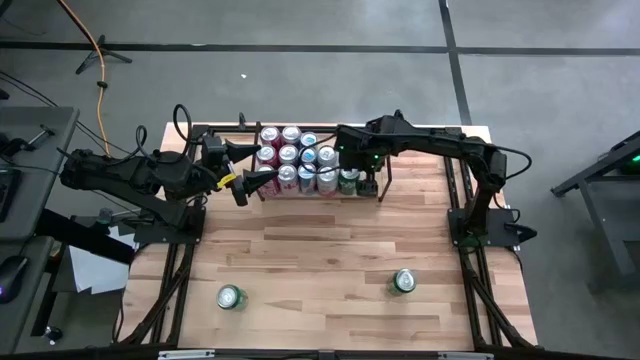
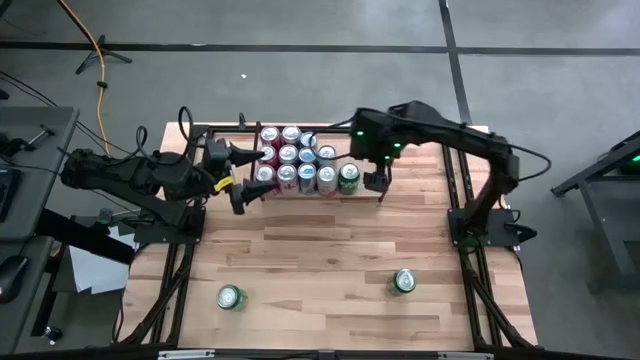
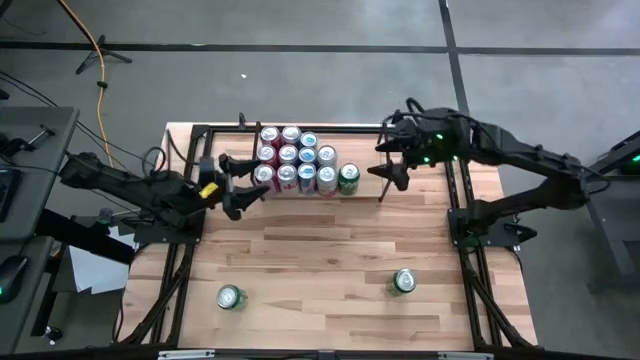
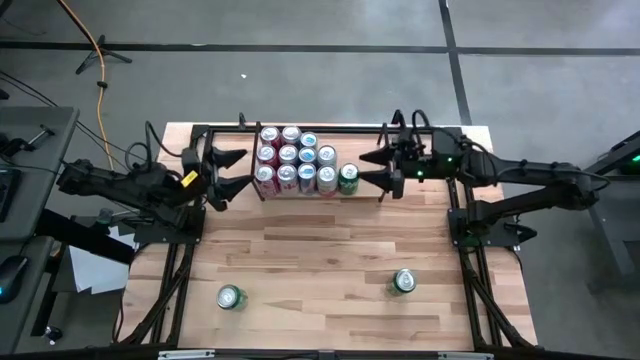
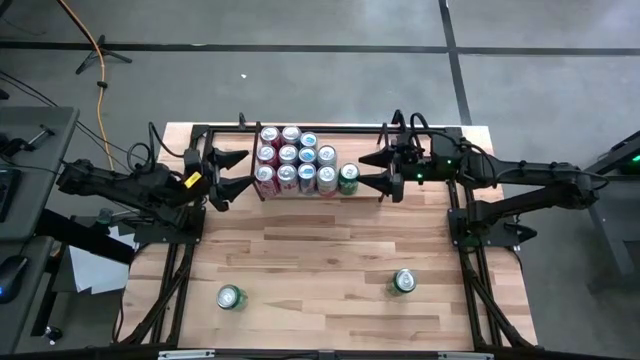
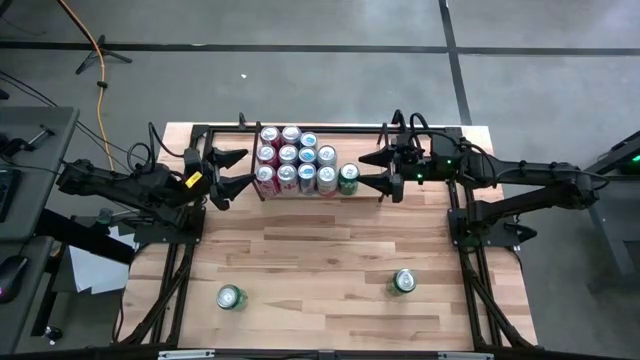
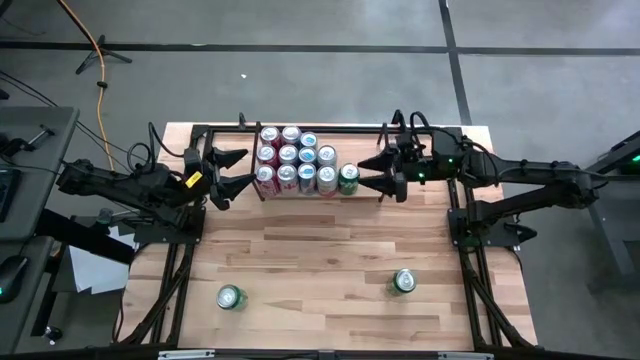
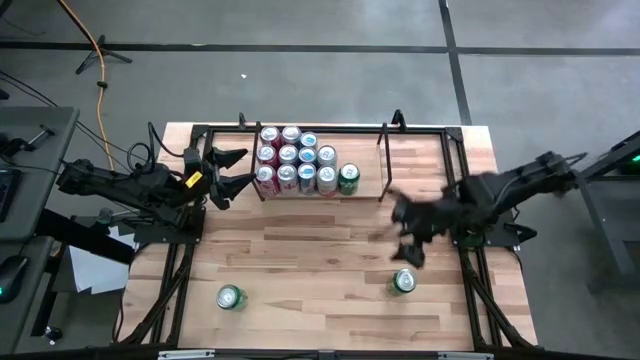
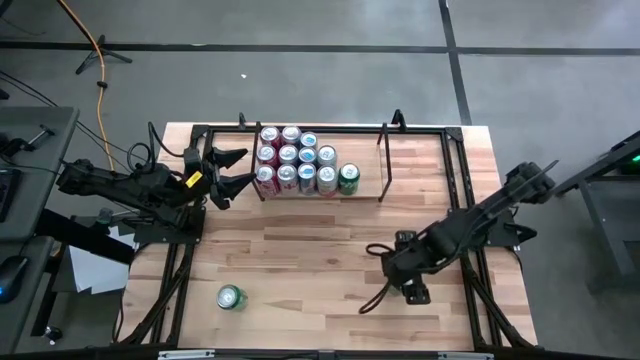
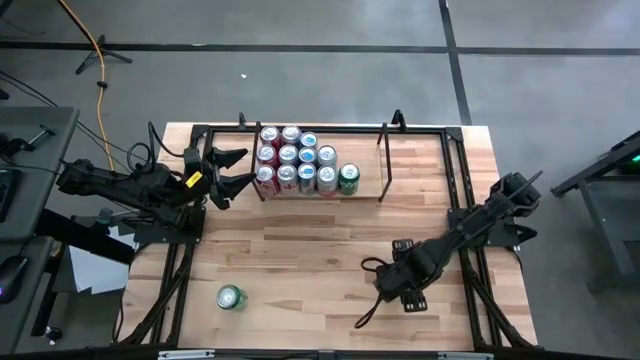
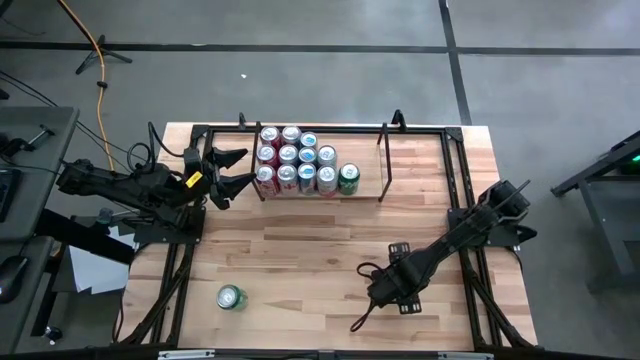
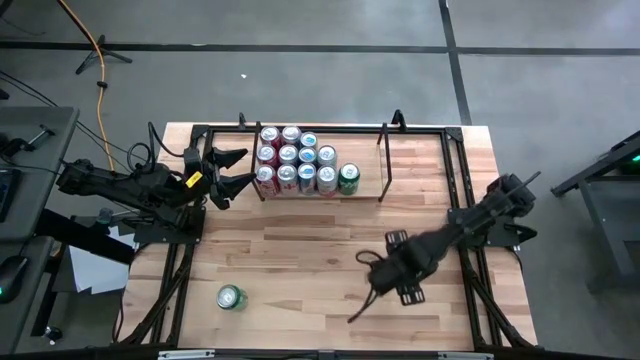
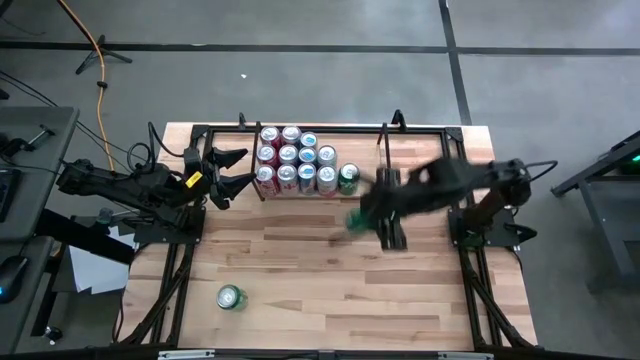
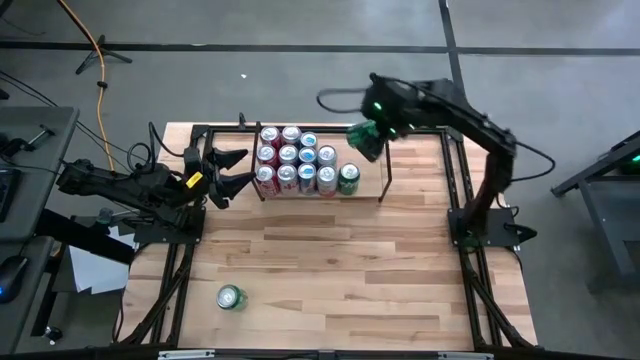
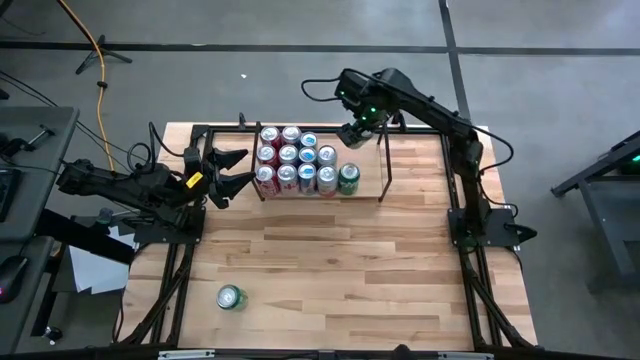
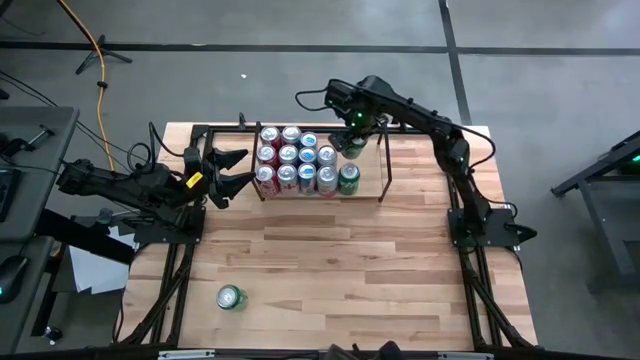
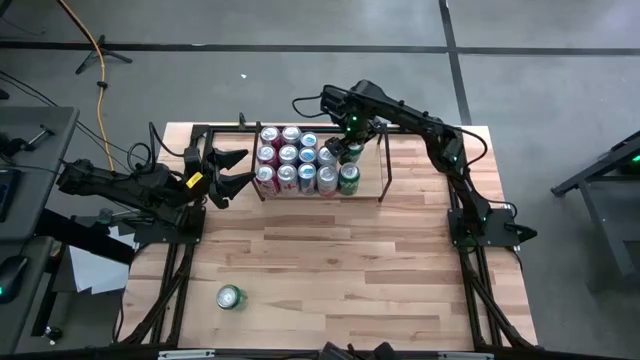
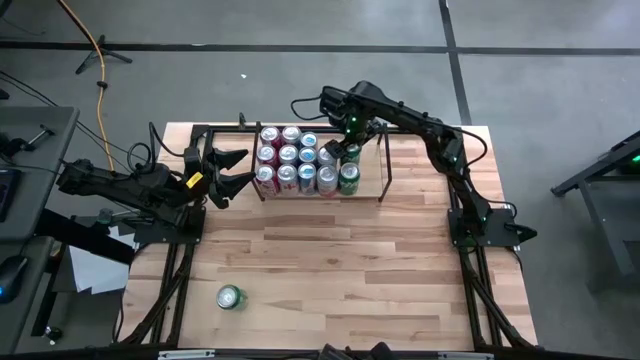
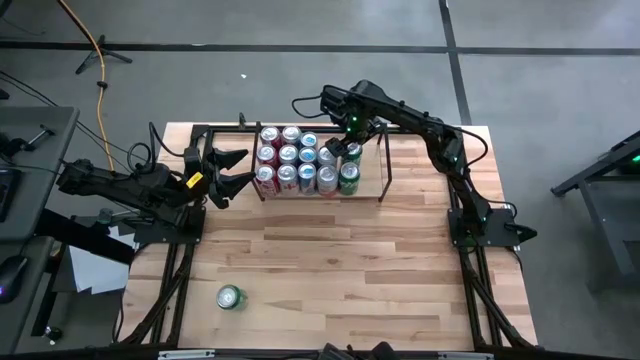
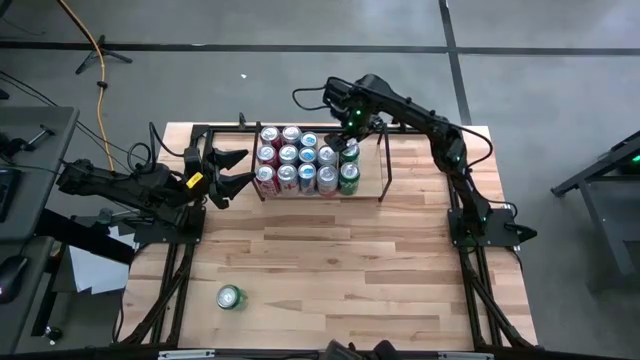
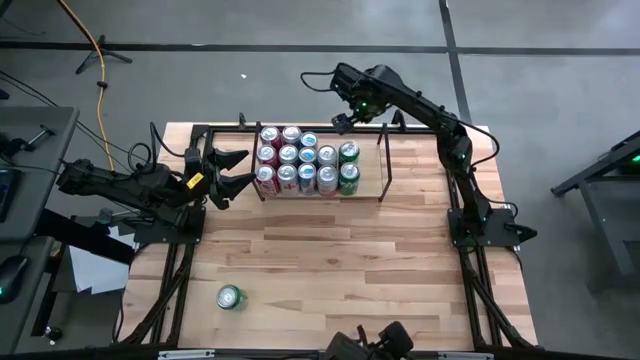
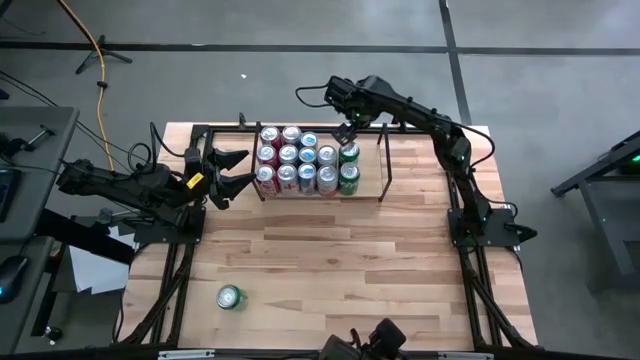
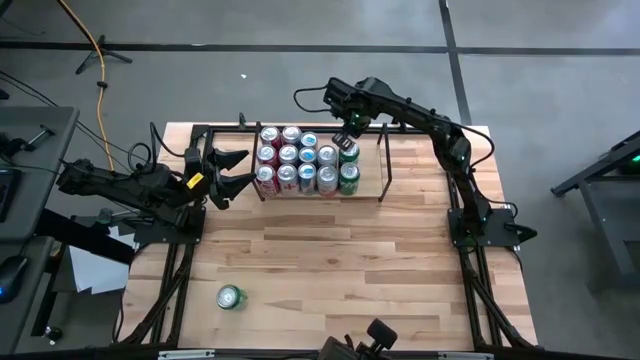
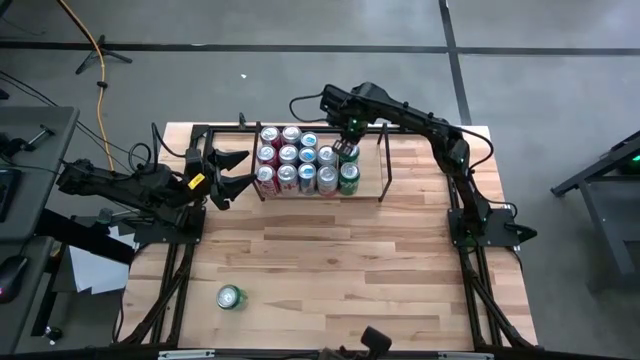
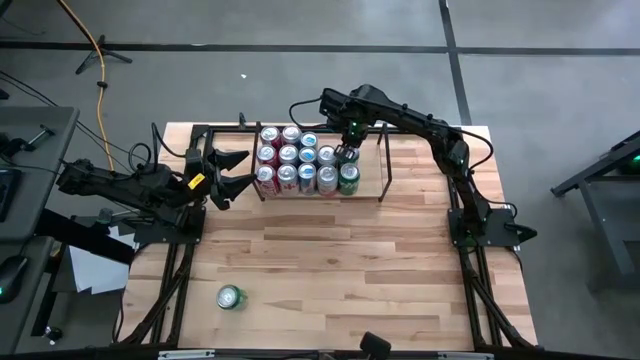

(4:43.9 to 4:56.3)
Task: Place canned beverage on shelf
Put the right green soda can on the shelf aligned with the other green soda can

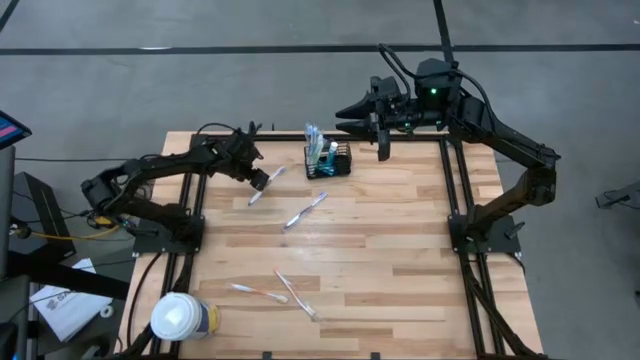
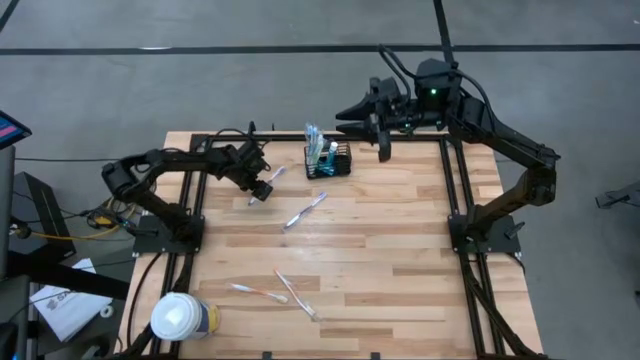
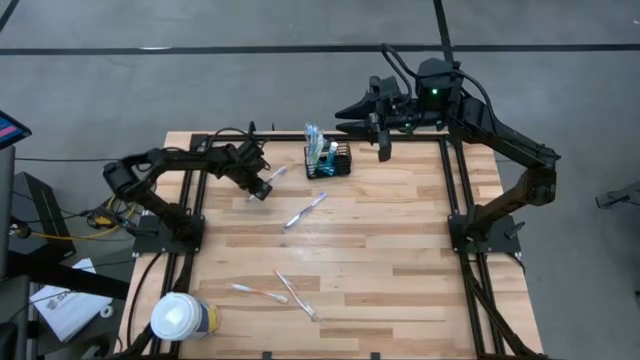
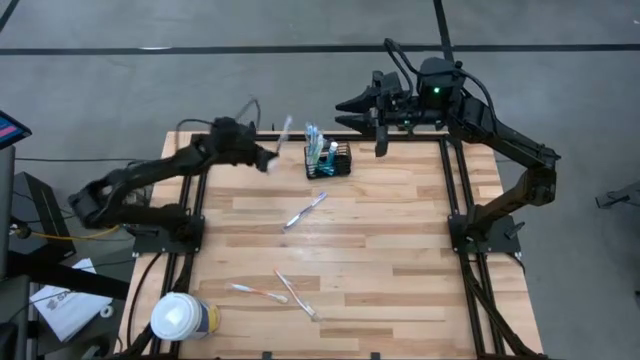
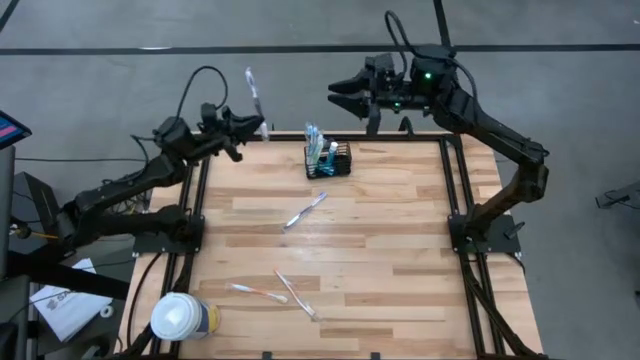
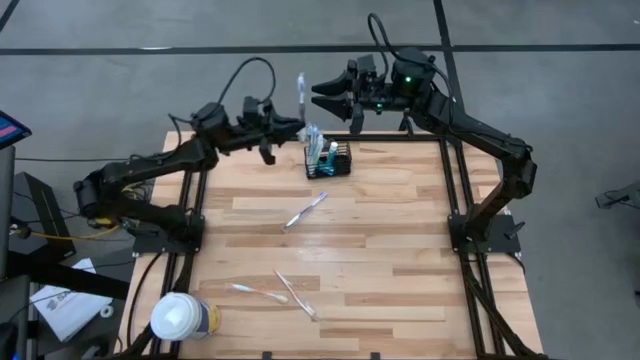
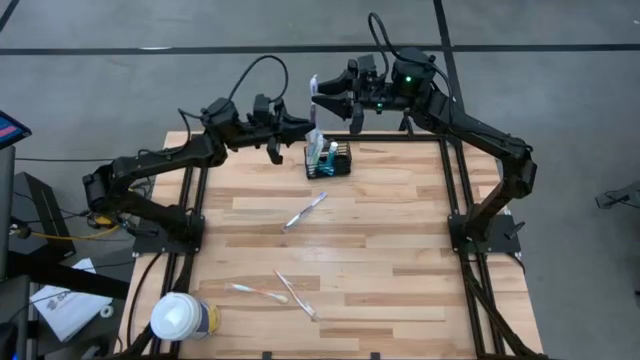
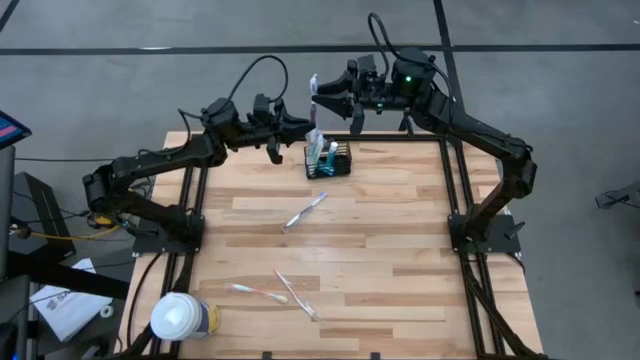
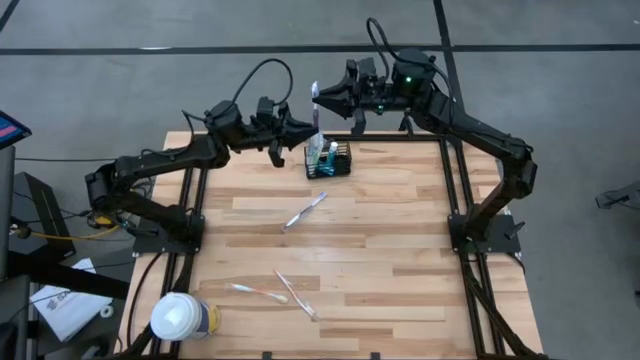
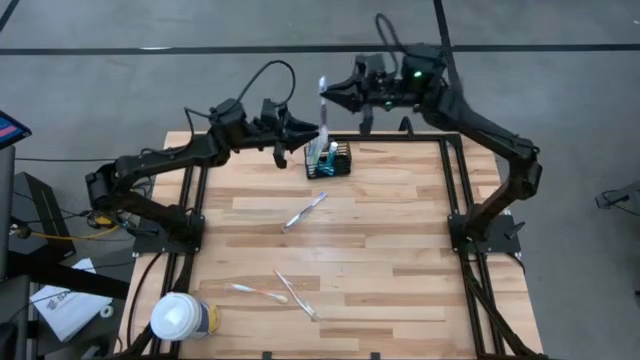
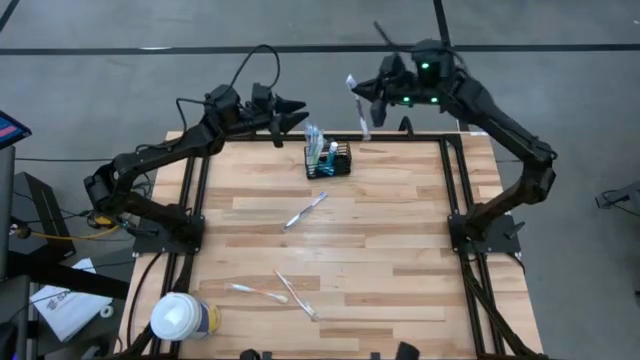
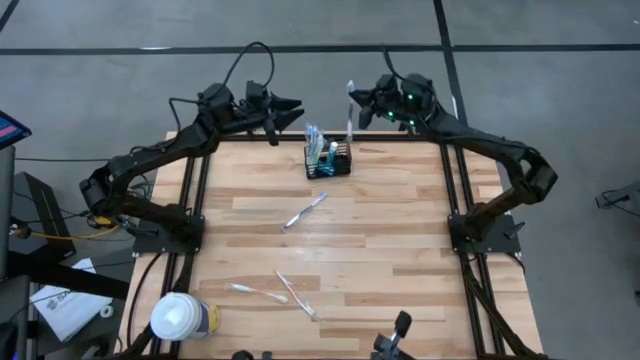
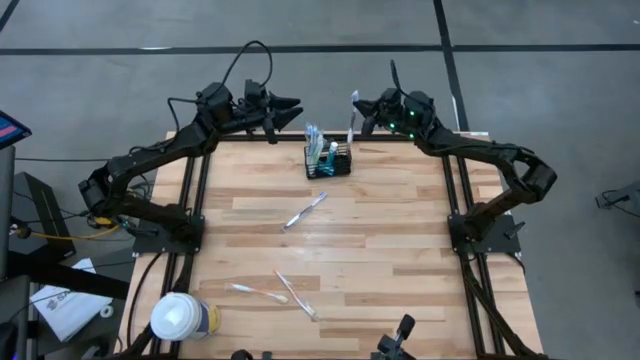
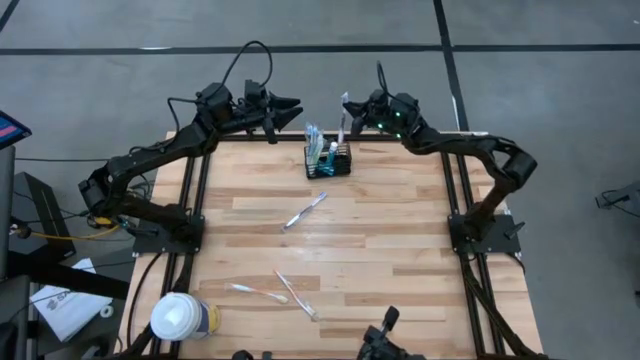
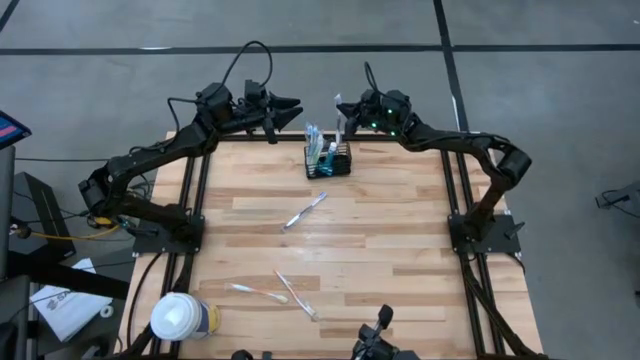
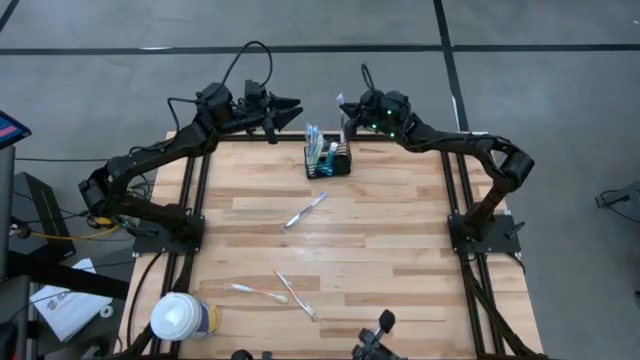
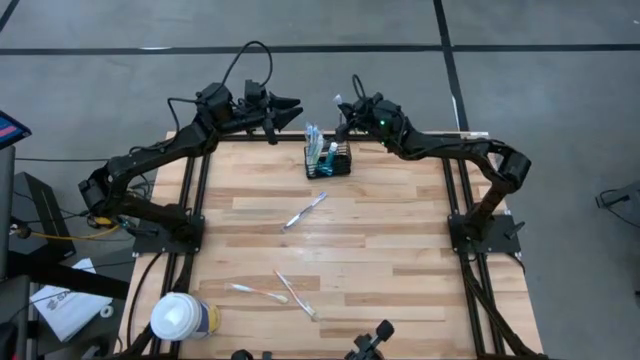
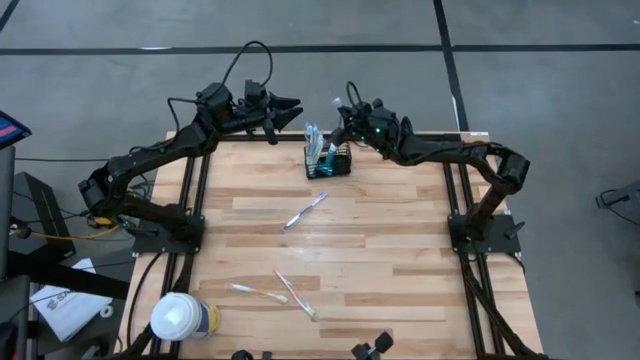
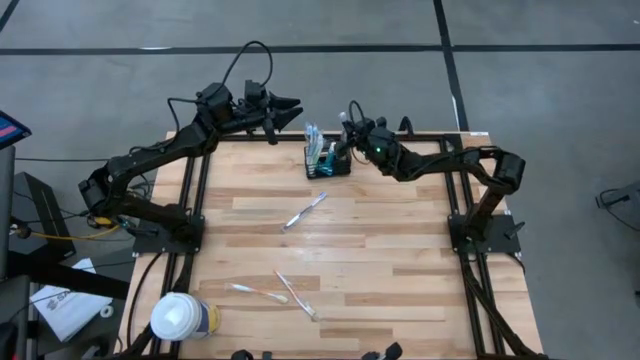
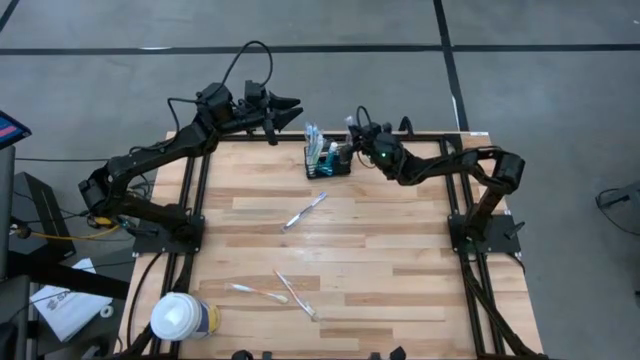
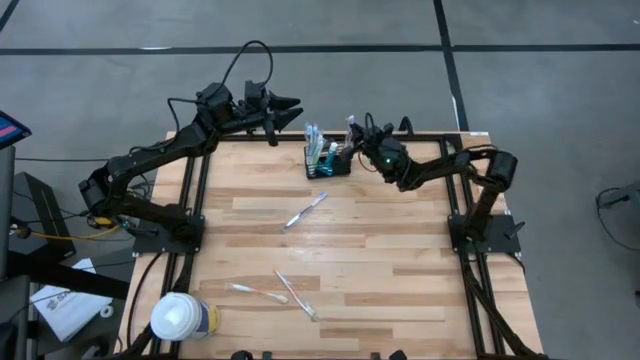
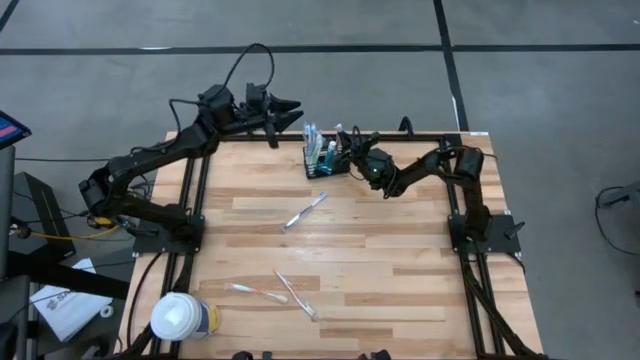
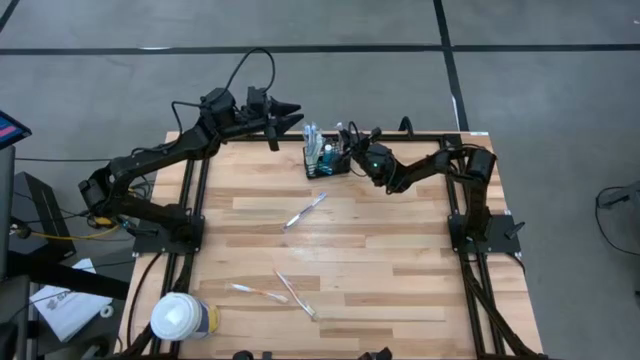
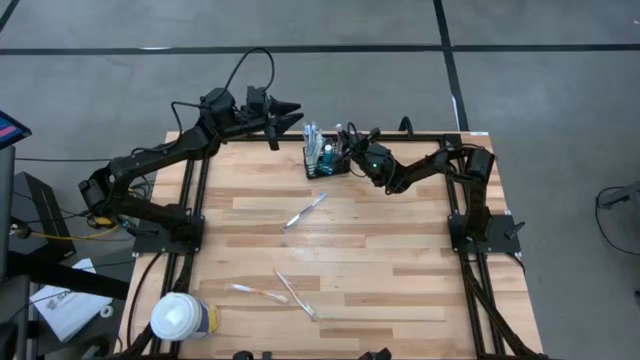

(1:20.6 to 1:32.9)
Task: Pick & Place toothbrushing station
Put the top purple toothbrush into the black wire organizer
